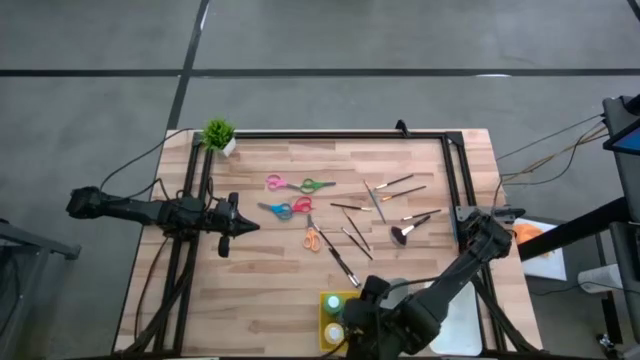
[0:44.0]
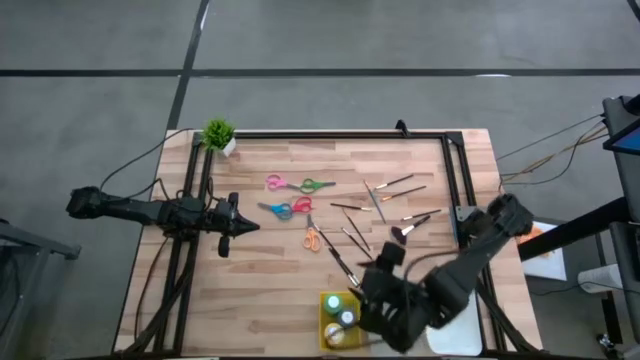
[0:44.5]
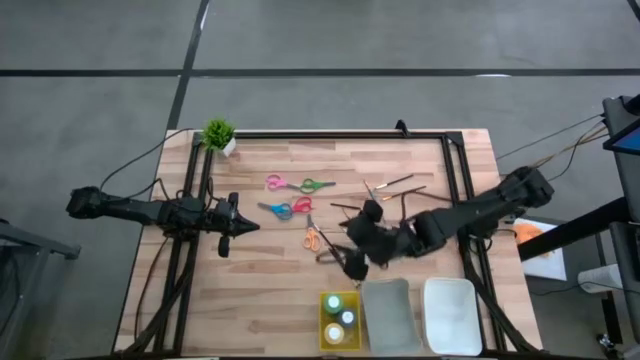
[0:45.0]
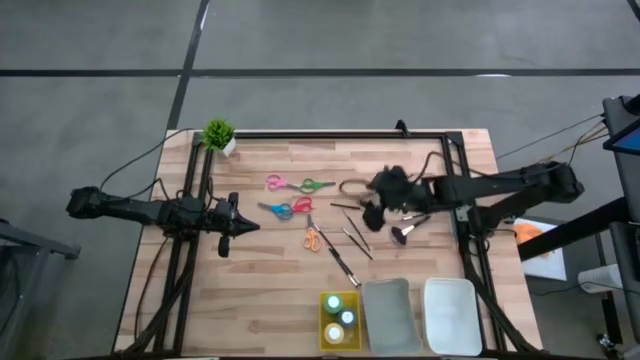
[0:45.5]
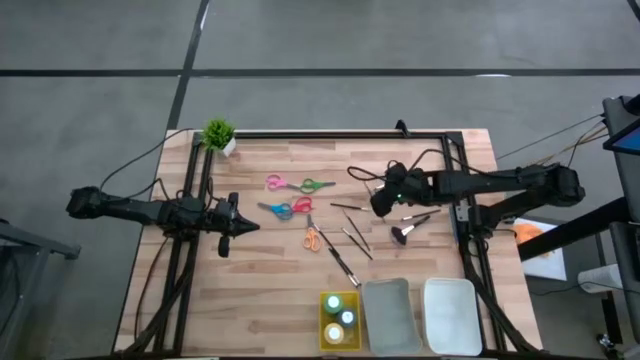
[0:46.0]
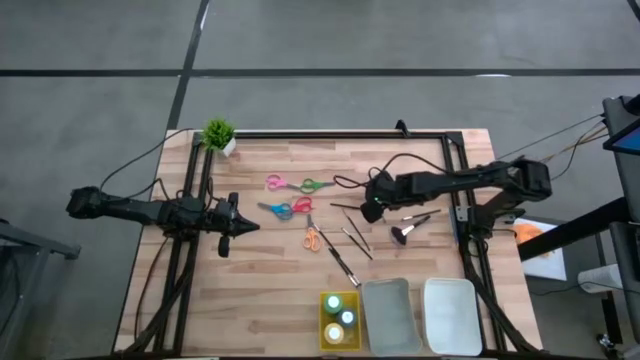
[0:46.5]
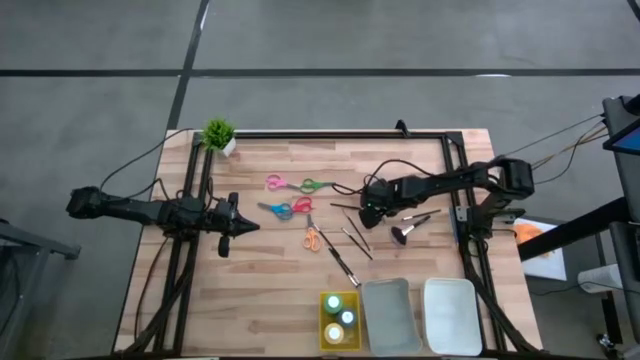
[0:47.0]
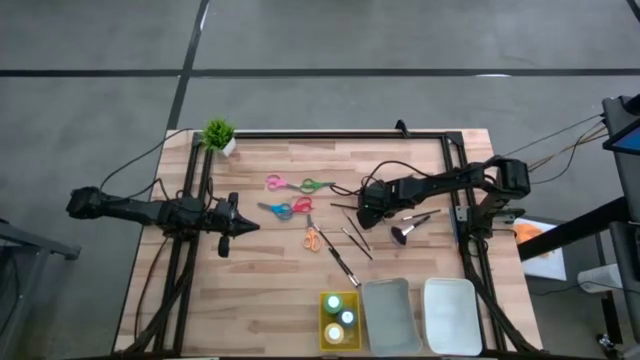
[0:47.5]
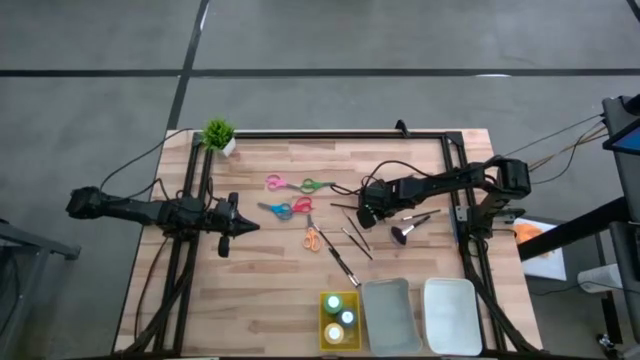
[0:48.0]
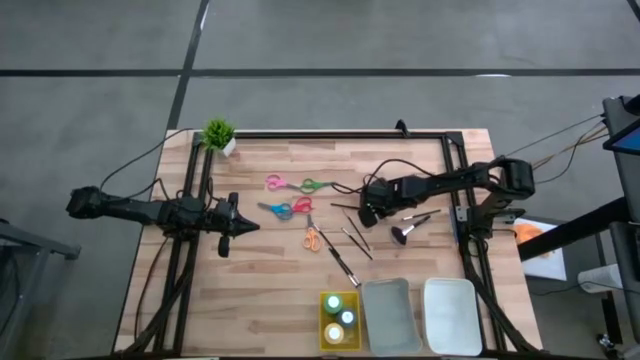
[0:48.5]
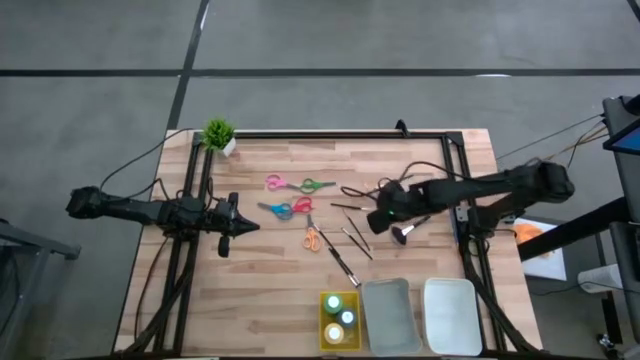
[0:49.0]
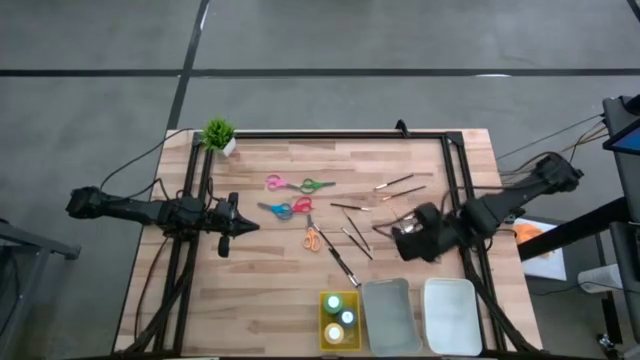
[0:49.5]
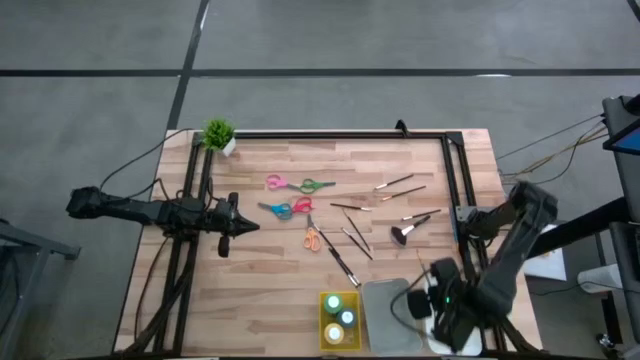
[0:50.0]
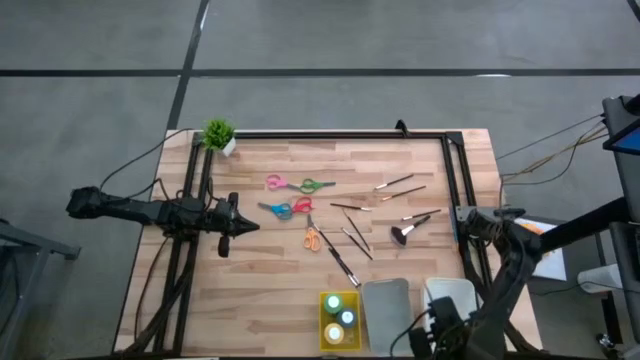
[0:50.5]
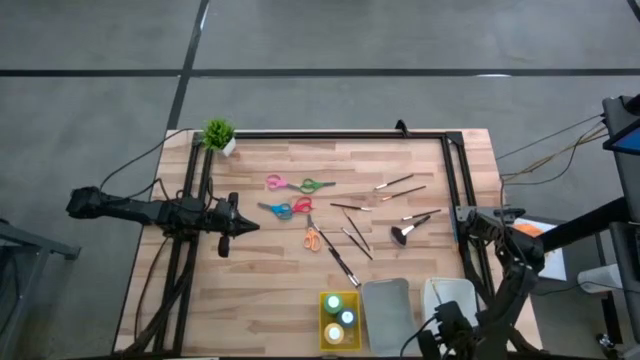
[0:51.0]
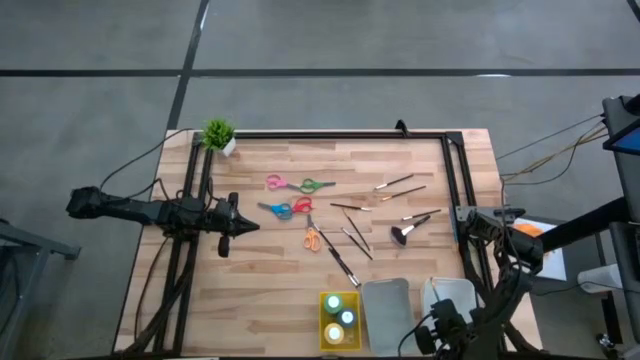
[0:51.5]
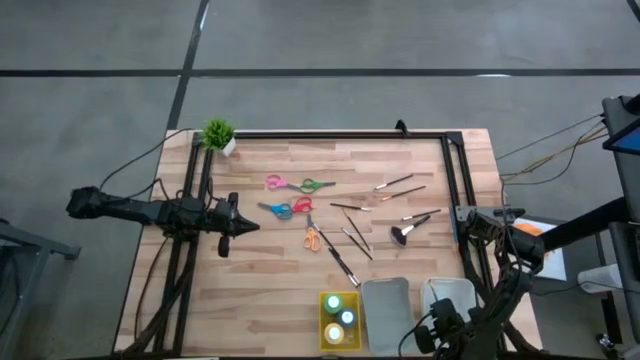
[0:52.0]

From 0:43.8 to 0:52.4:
Task: Pick & Place Paint Supplies
Put the blue paint brush into the white bin
